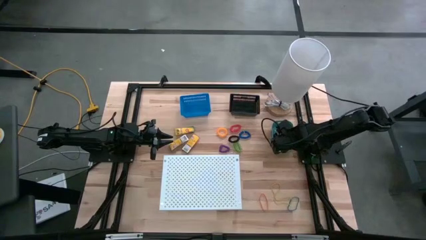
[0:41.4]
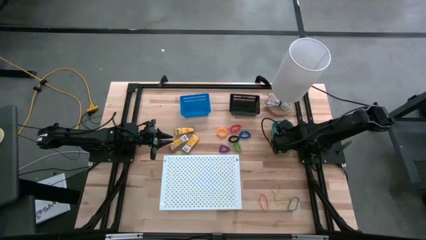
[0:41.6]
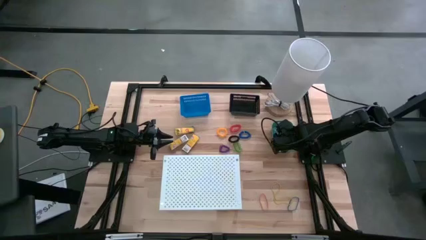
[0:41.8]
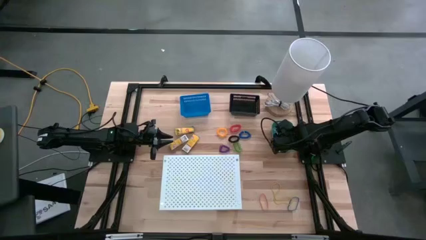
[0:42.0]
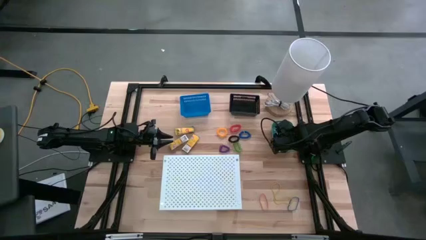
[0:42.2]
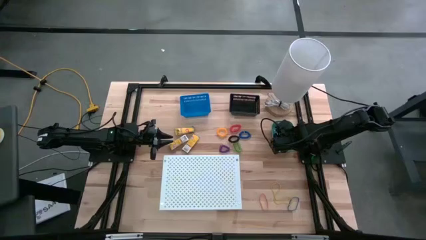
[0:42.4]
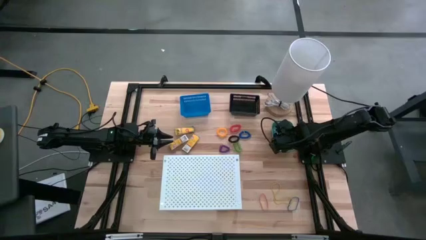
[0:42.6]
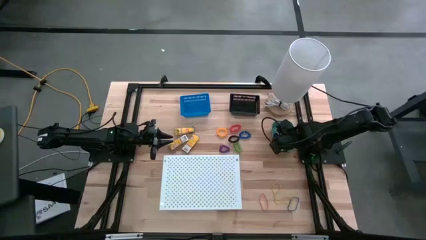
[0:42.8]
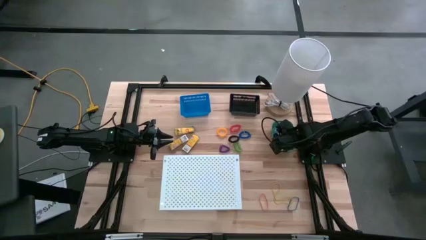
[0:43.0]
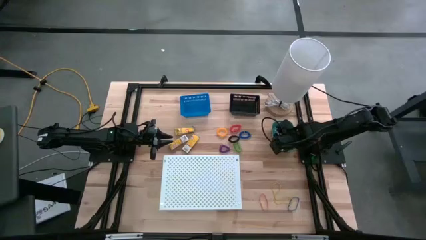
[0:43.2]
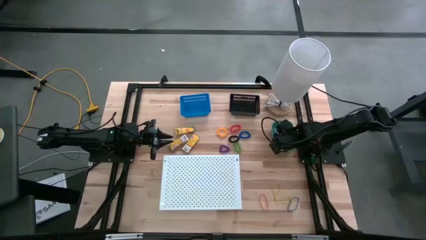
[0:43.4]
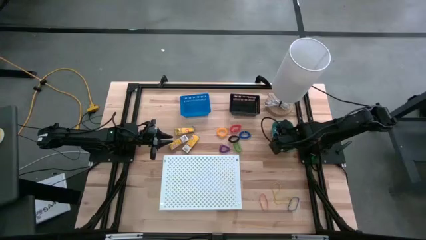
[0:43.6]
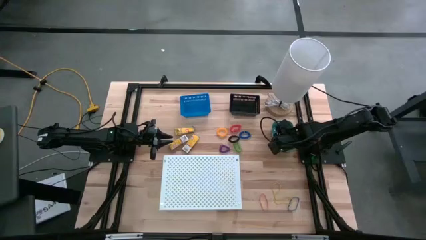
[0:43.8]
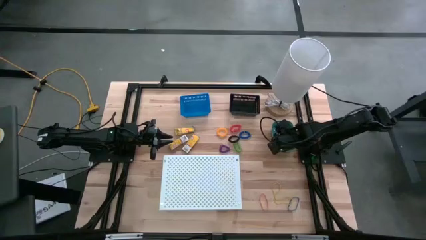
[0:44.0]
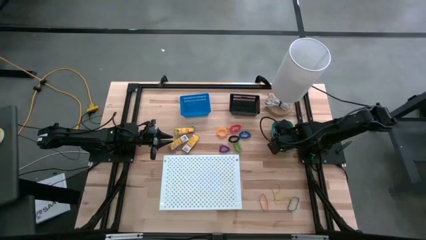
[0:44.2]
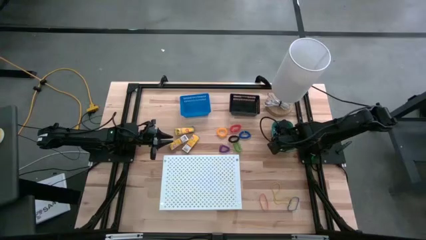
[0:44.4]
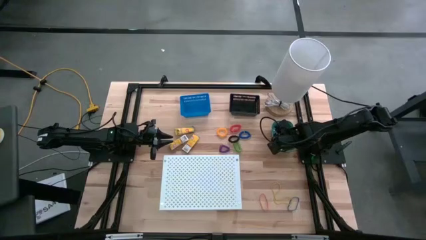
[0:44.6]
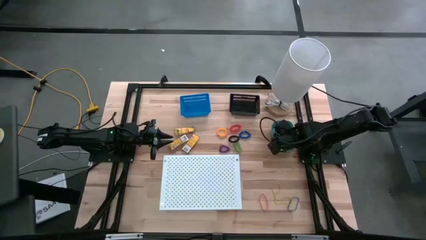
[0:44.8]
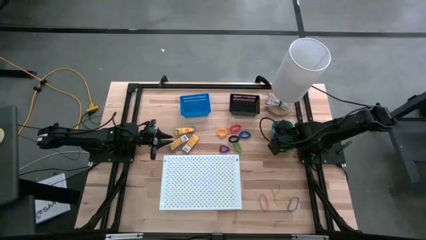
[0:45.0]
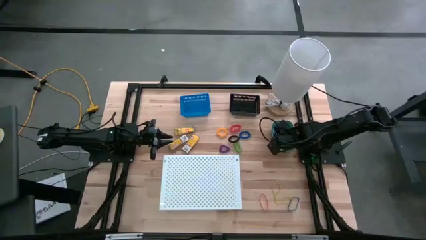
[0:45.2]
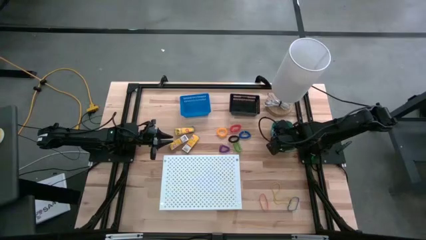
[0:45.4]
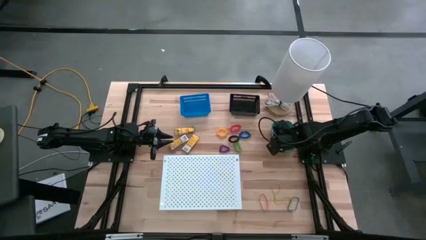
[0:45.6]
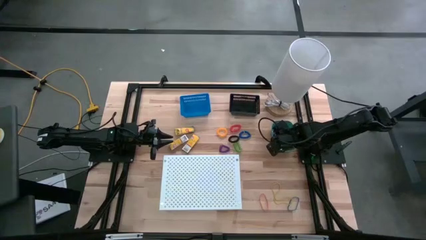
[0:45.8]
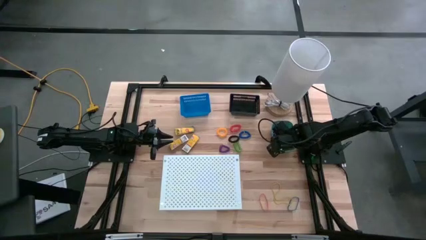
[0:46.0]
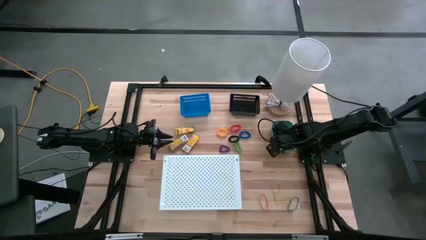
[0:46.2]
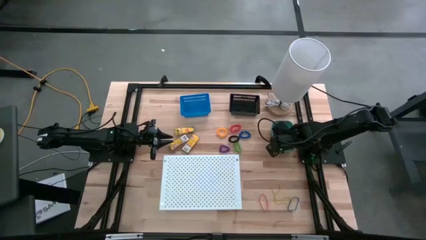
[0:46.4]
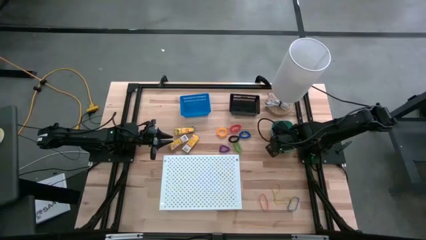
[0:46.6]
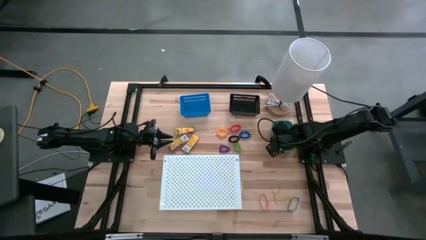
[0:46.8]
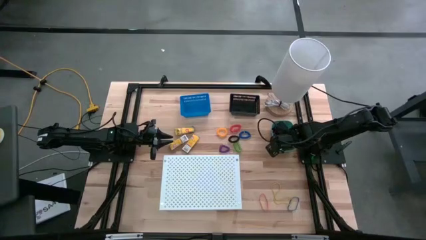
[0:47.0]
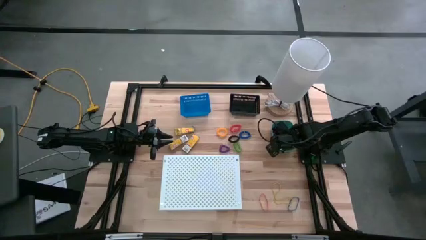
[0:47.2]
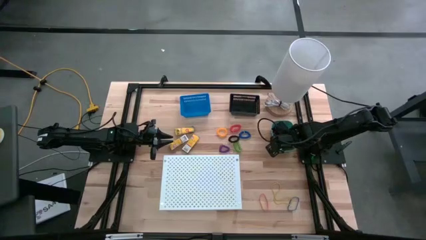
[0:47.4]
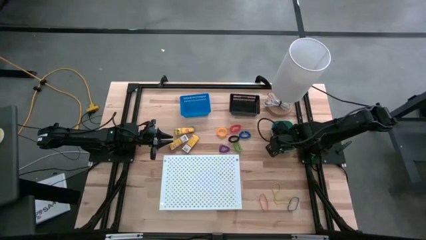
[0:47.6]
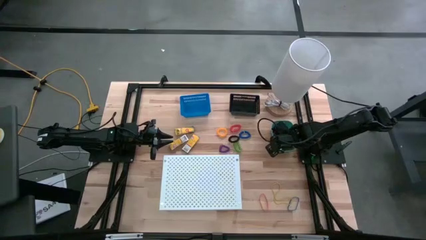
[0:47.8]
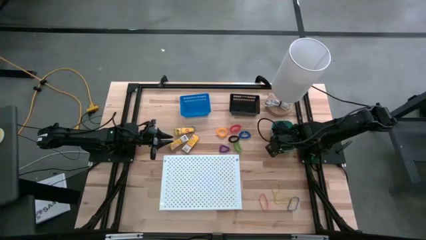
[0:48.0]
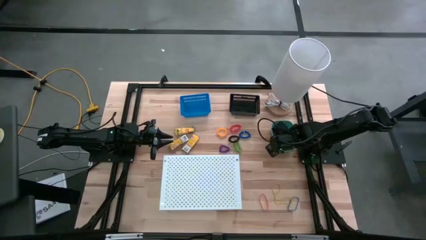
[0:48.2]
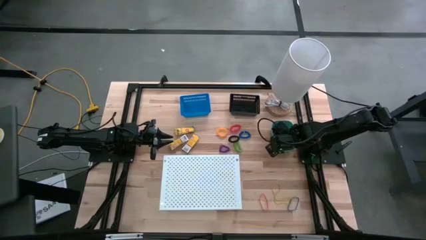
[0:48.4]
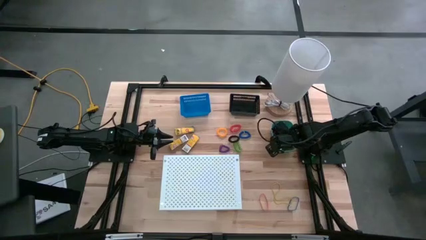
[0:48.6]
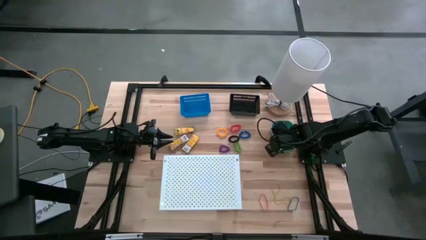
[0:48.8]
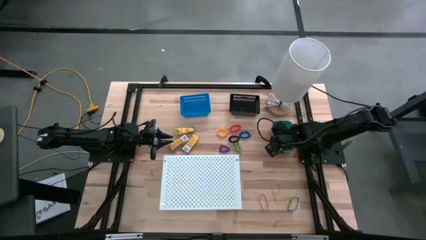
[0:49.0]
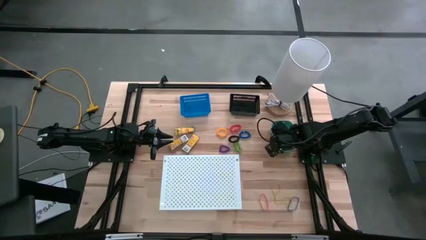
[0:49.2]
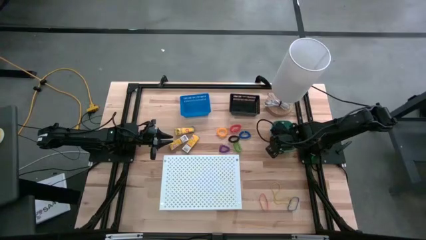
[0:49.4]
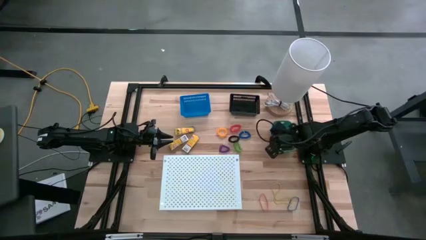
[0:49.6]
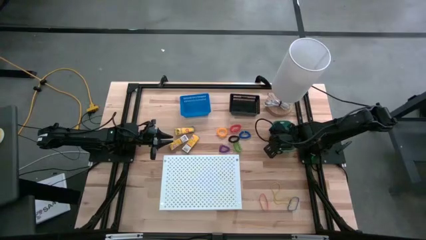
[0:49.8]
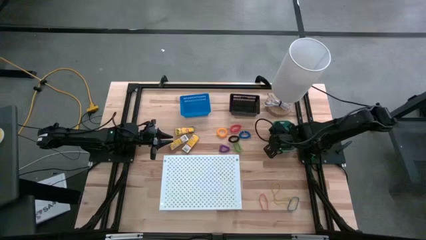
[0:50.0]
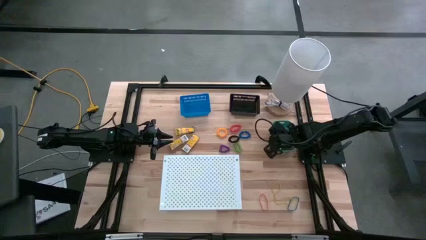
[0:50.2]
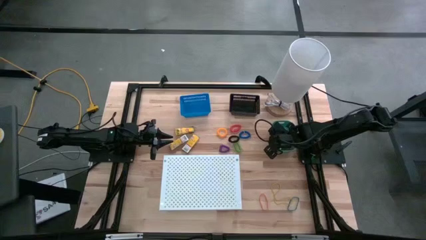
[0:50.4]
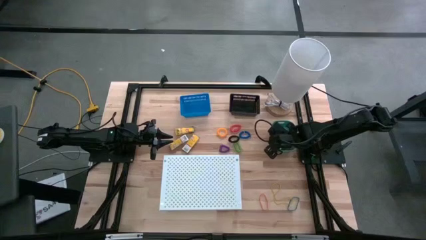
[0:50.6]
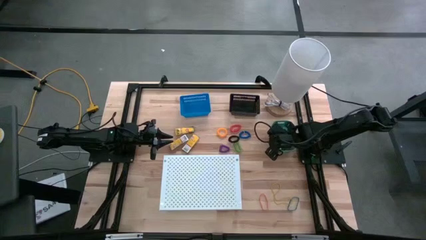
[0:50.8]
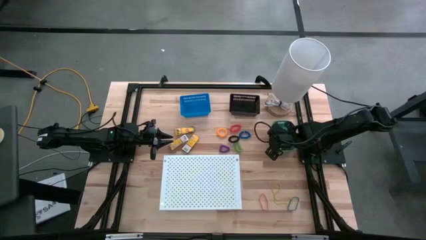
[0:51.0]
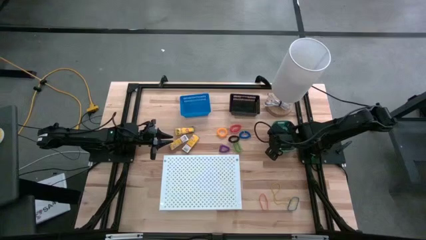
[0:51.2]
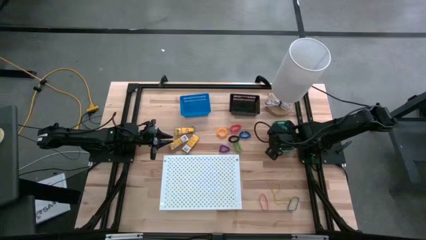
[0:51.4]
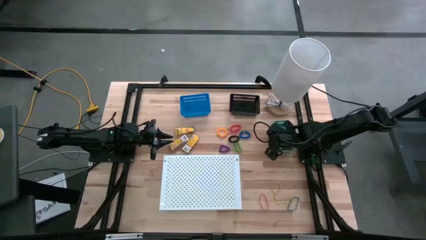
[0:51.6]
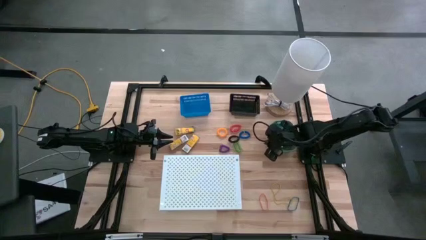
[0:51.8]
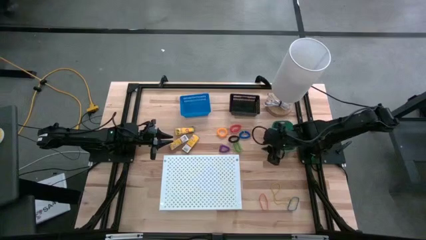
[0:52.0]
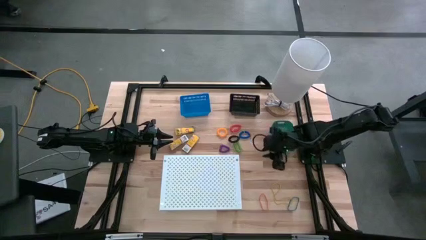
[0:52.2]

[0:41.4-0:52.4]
Task: Pick & Place Office Desk Supplies
Put the yellow rubber band into the green bin
